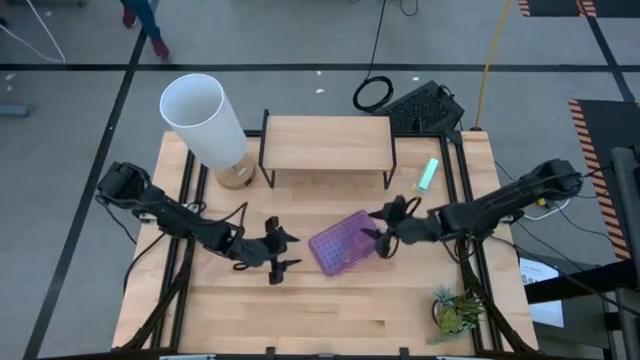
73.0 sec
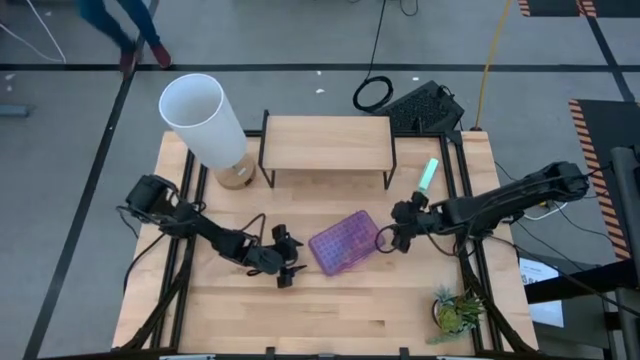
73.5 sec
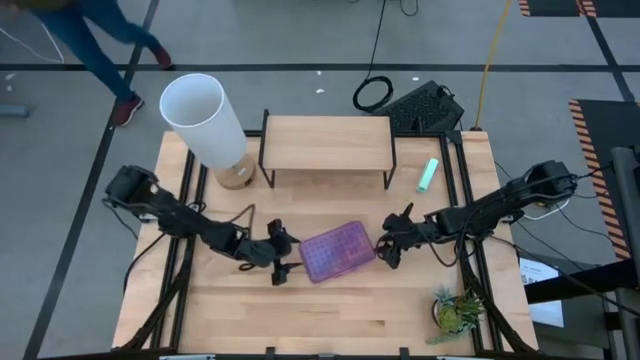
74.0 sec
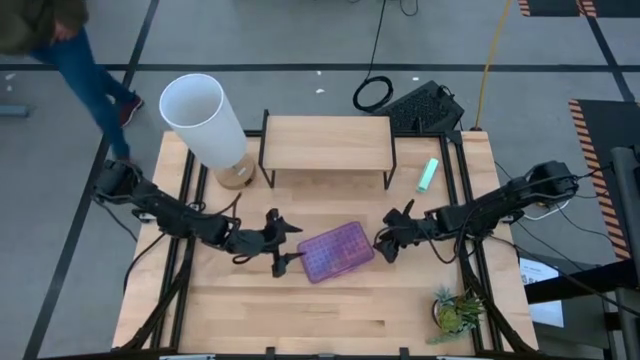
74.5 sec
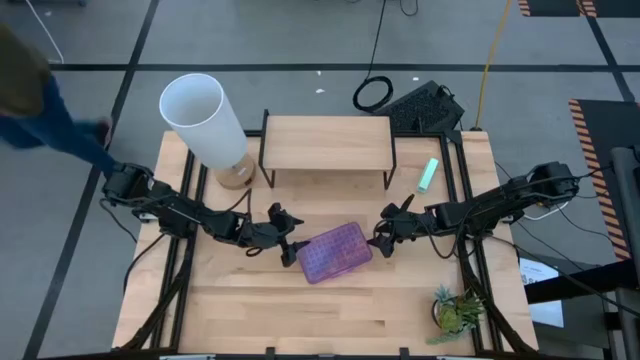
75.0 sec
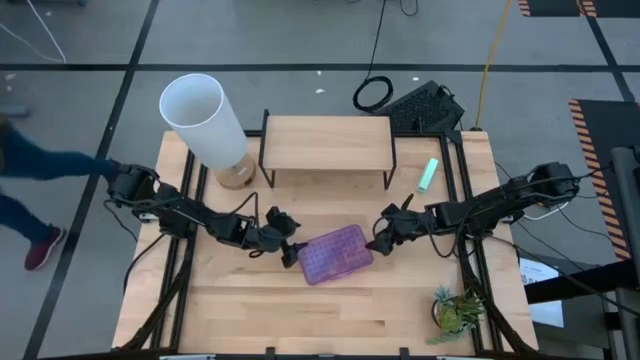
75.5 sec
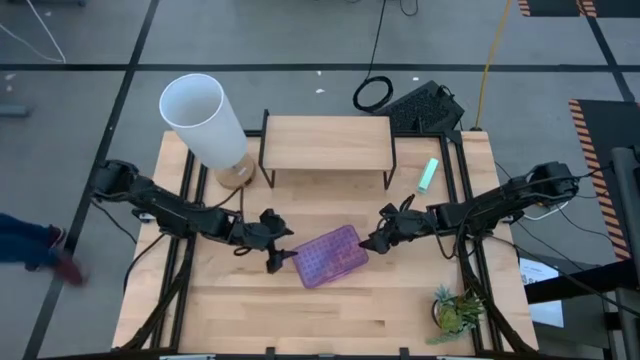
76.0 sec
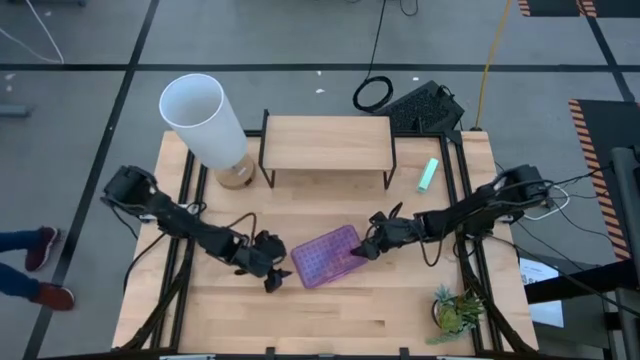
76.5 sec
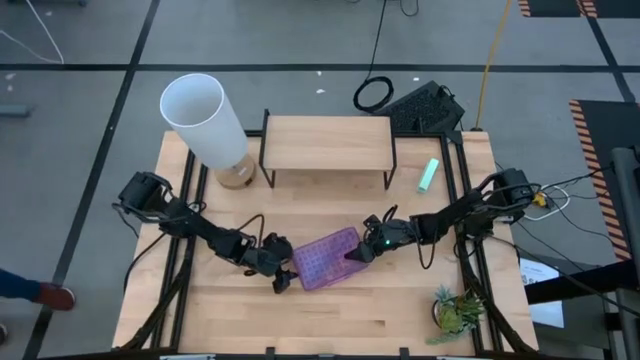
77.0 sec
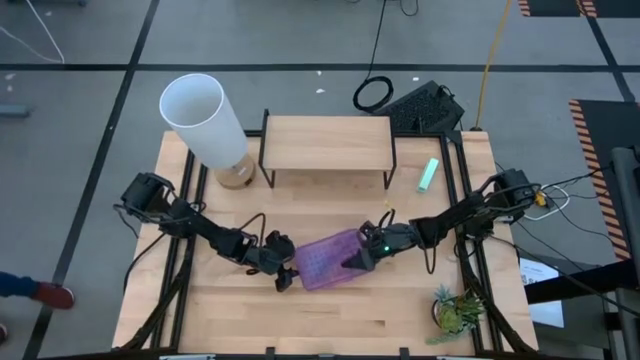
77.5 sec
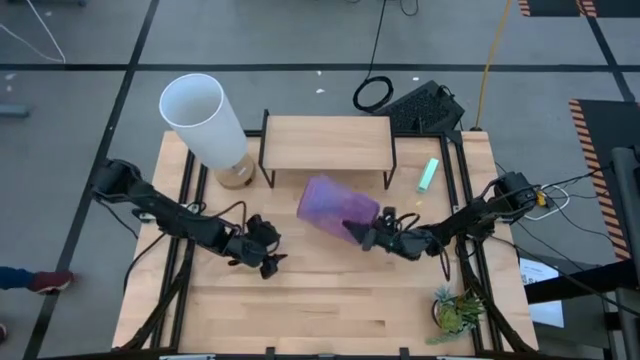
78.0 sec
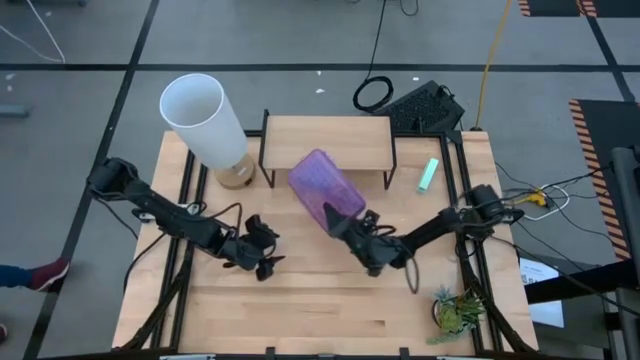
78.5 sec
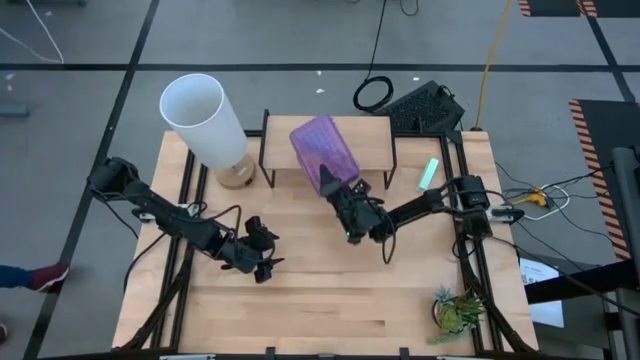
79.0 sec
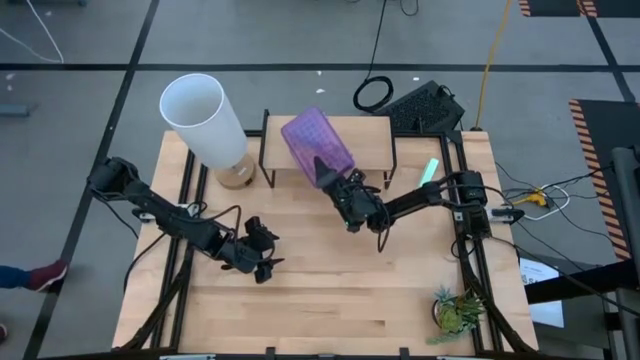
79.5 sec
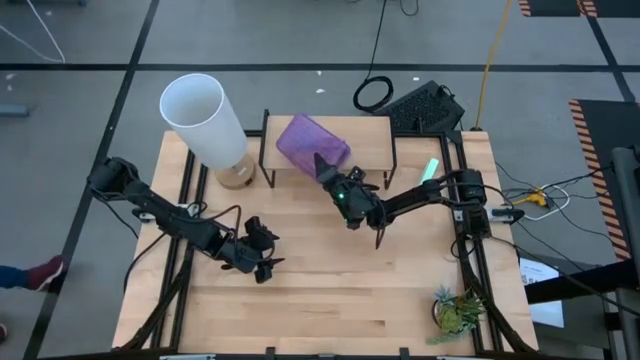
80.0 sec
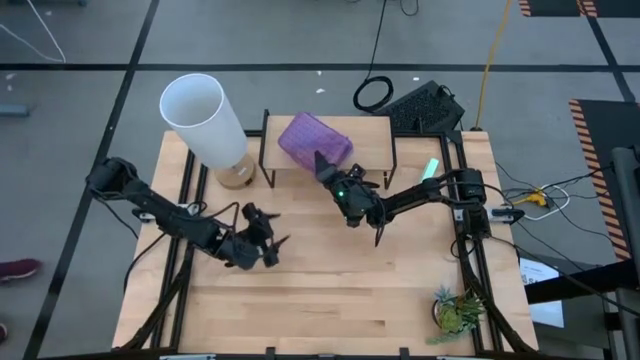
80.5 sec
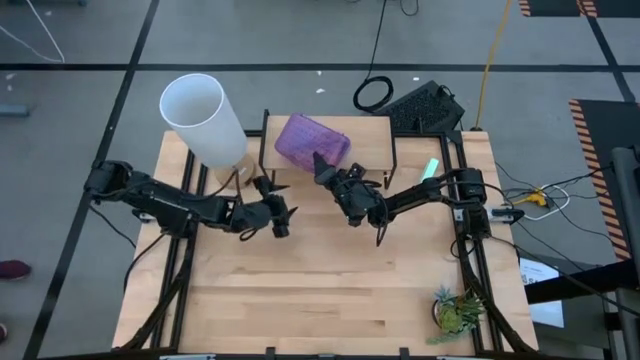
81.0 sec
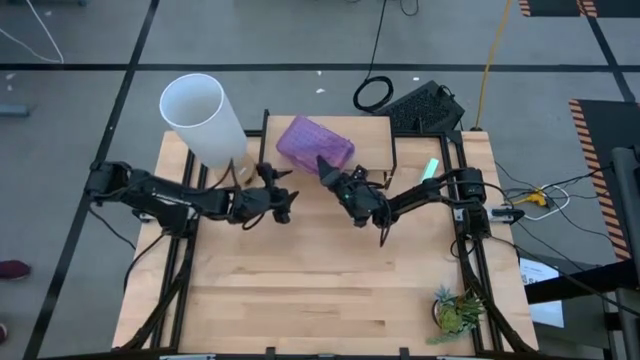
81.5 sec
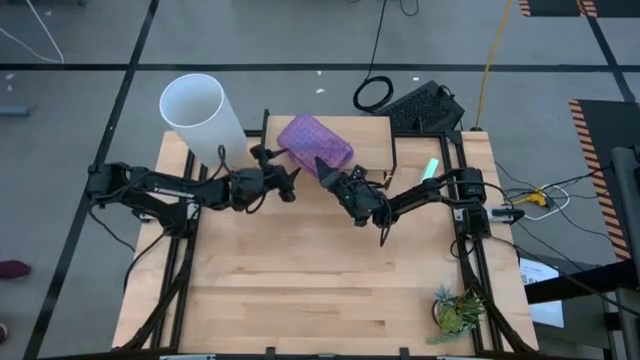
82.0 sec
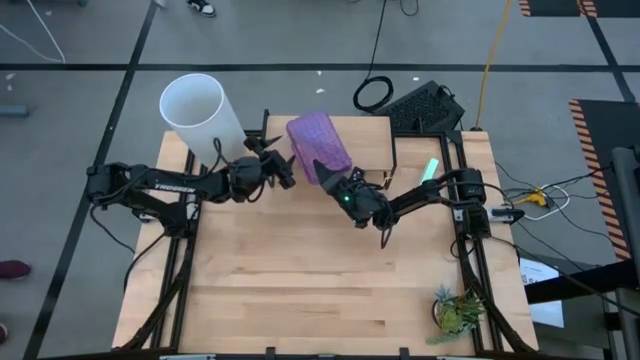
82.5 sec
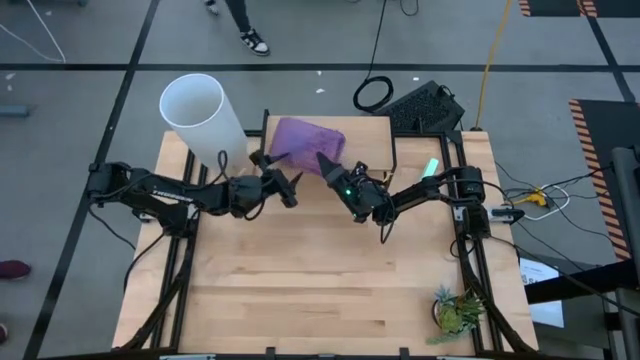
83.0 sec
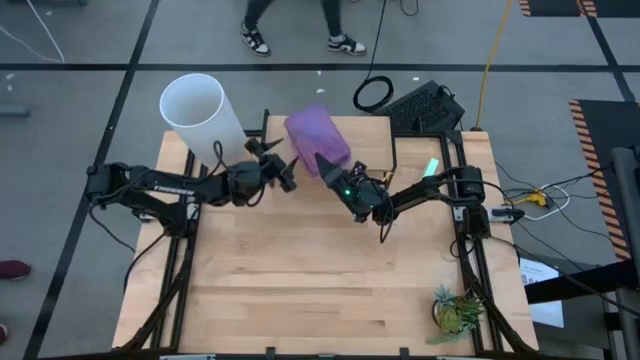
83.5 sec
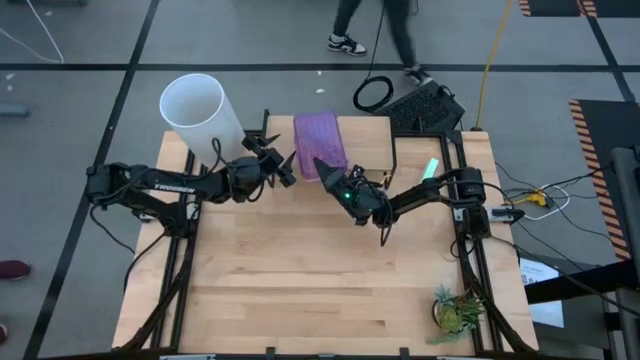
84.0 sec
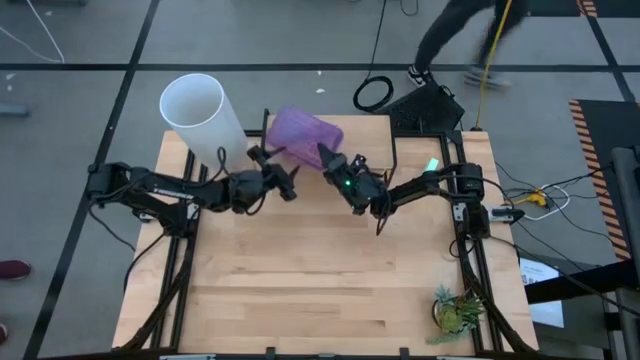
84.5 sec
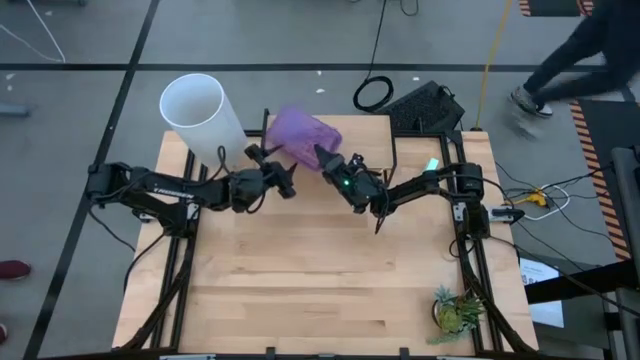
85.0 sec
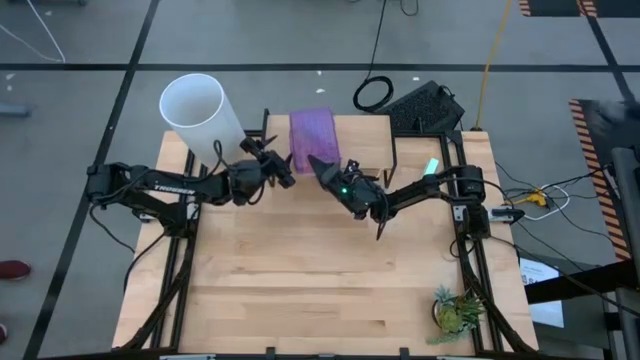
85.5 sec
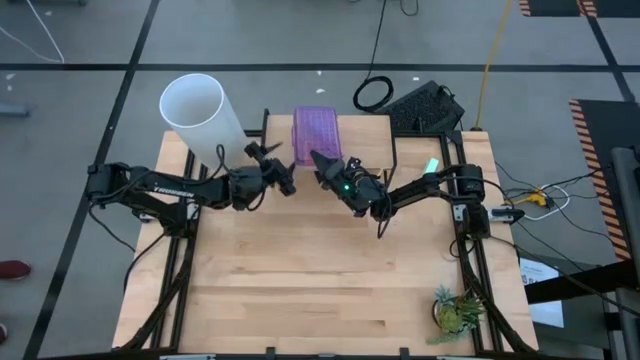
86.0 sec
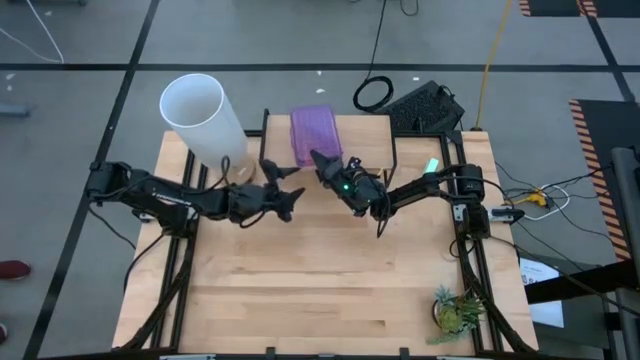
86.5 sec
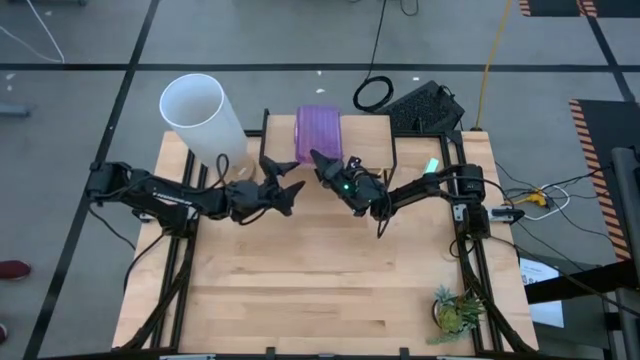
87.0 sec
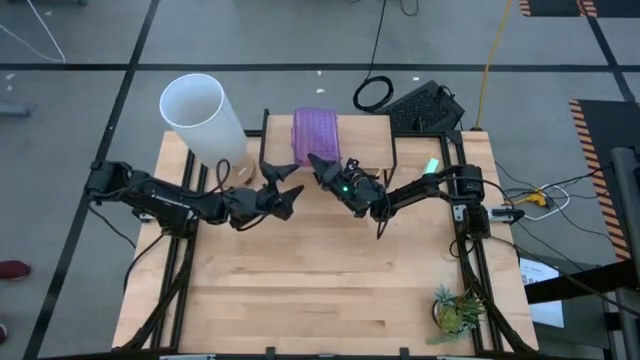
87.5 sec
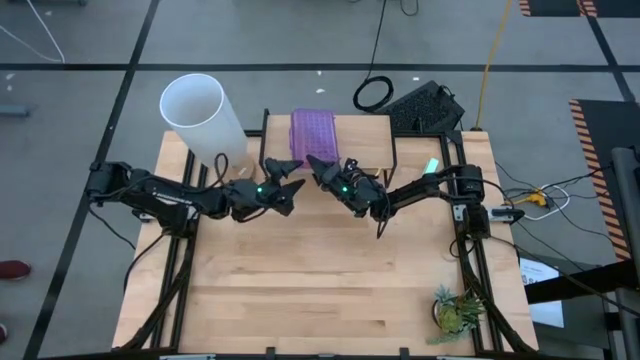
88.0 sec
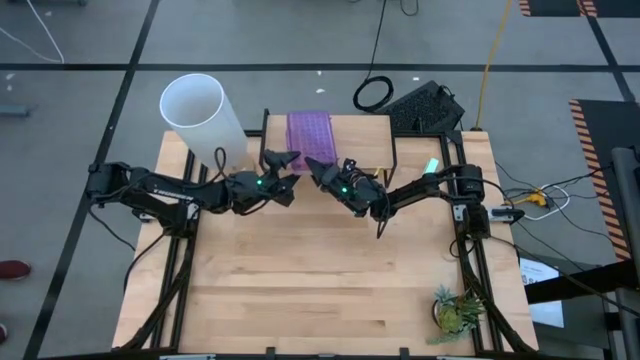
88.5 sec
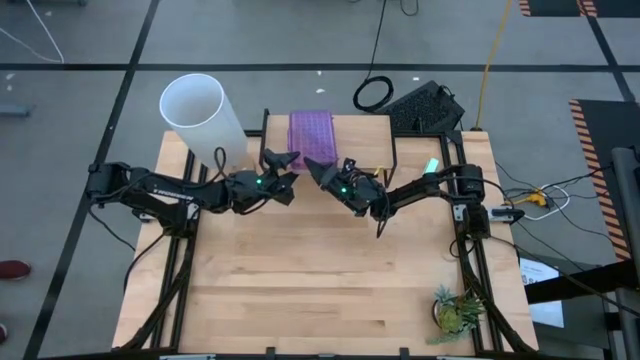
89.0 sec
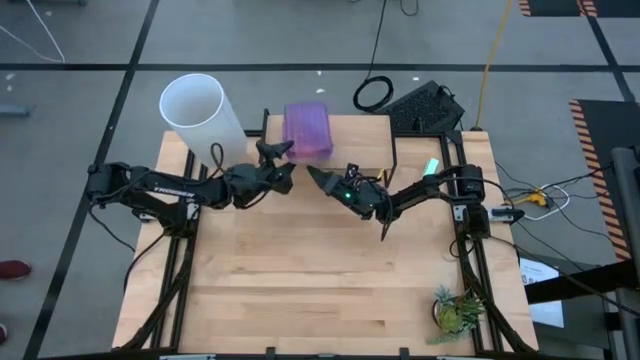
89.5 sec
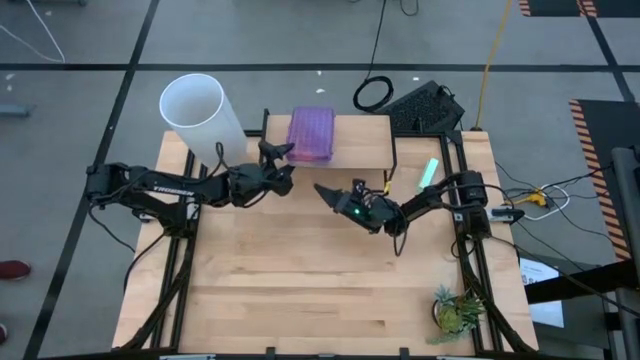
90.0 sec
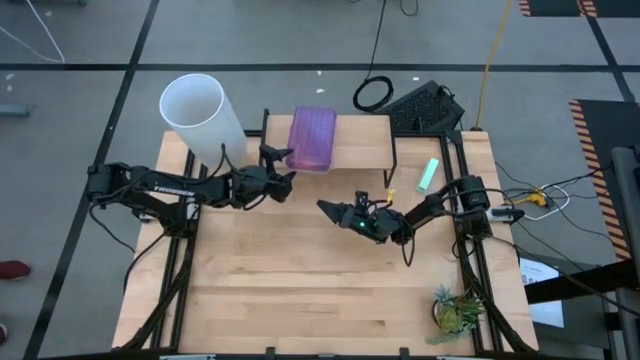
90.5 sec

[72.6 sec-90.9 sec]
Task: Pack school essentials
Put the supply box on the shelf

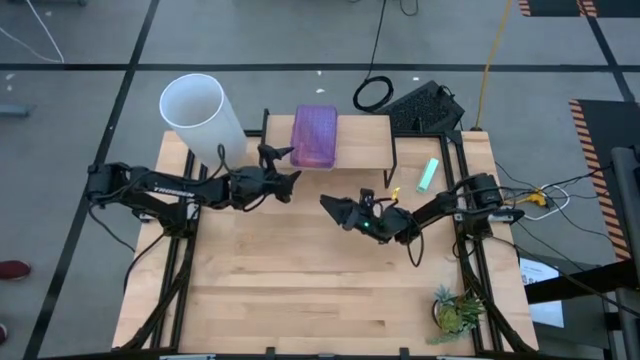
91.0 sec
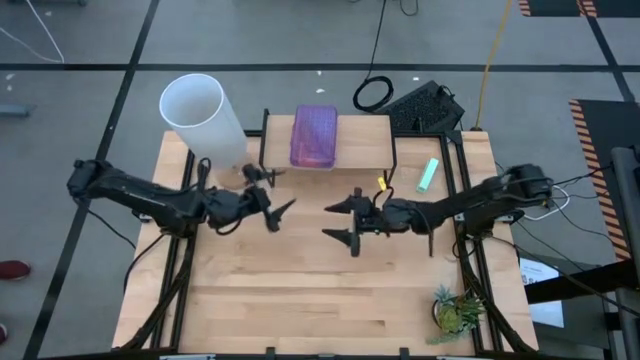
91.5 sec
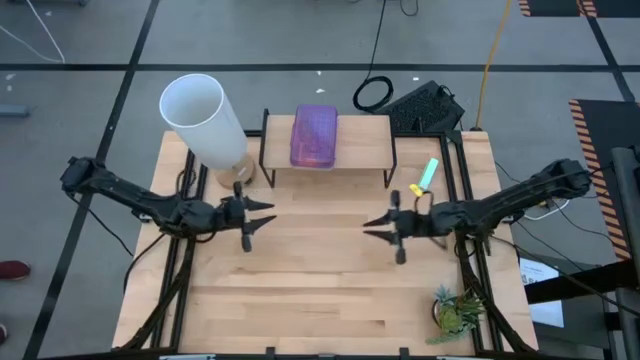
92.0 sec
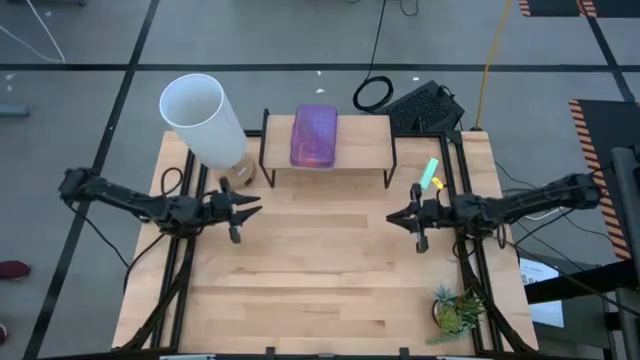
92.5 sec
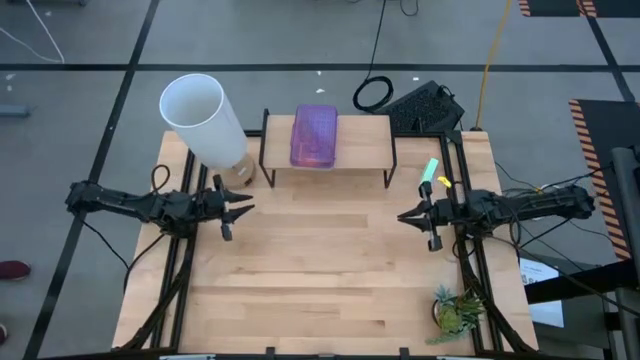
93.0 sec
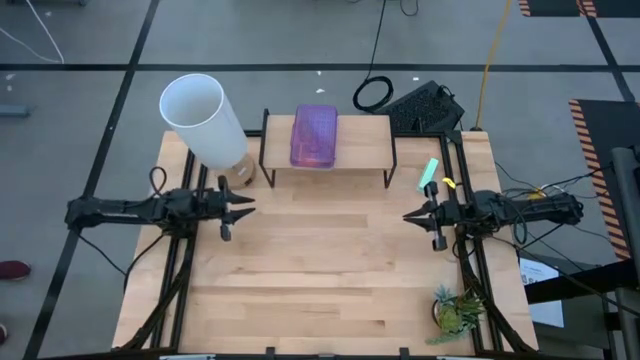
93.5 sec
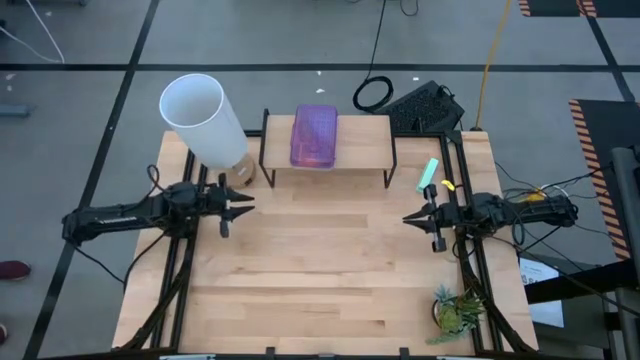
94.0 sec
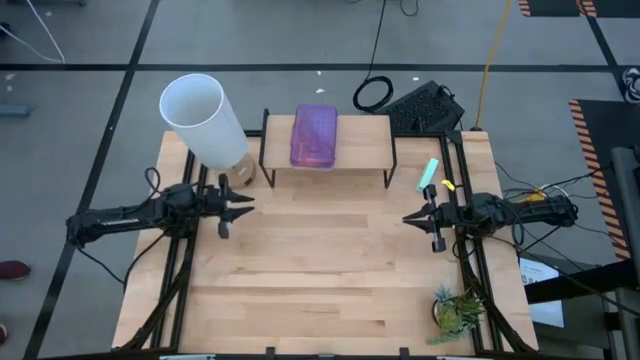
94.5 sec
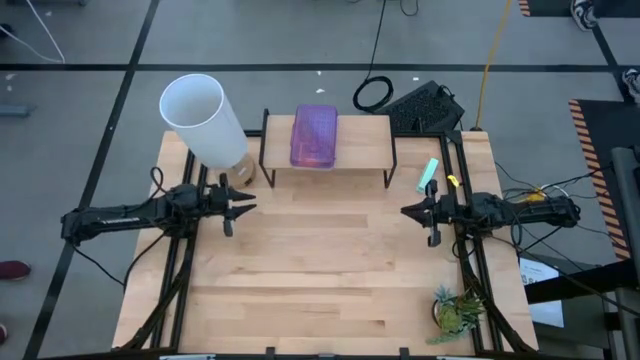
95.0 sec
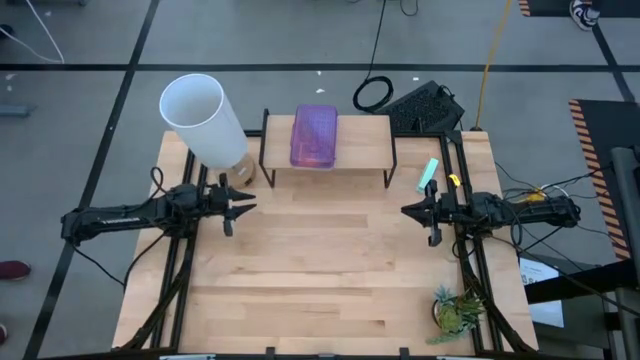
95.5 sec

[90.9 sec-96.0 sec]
Return to Home Position
